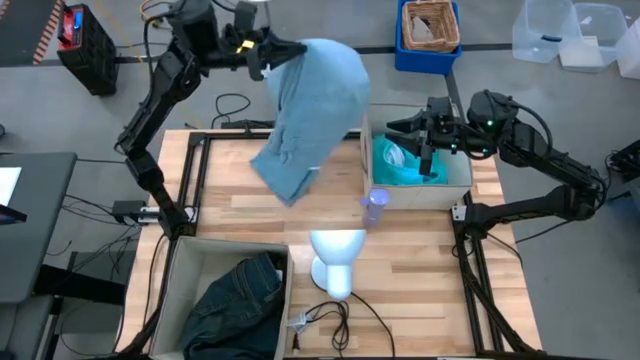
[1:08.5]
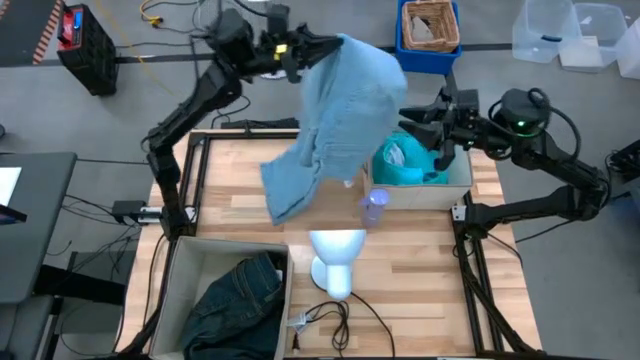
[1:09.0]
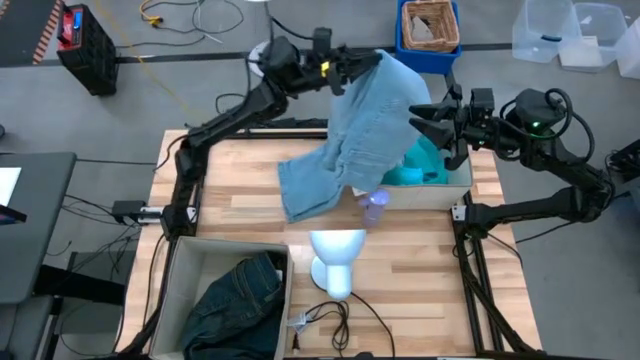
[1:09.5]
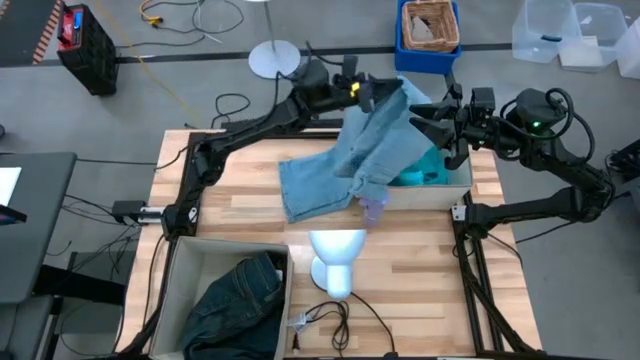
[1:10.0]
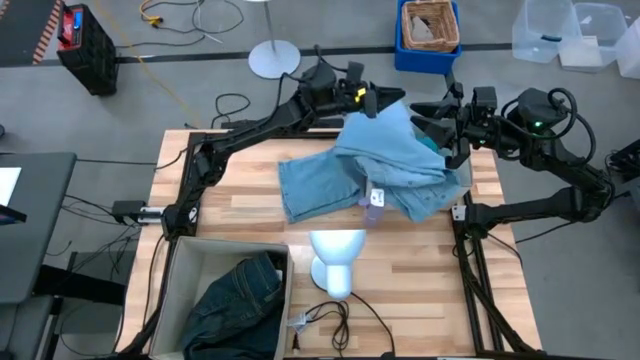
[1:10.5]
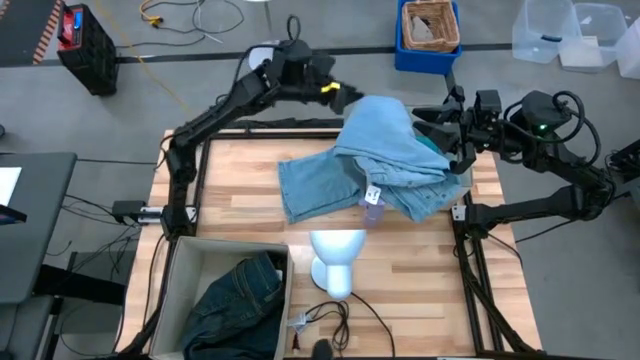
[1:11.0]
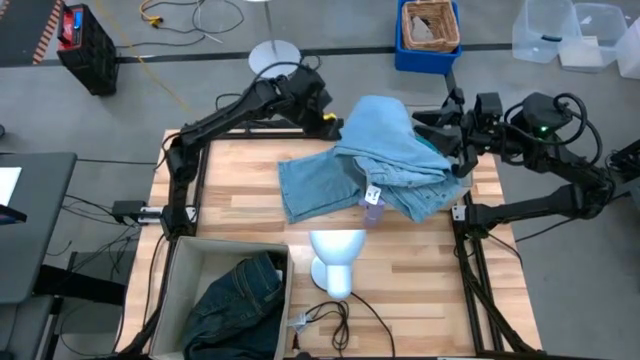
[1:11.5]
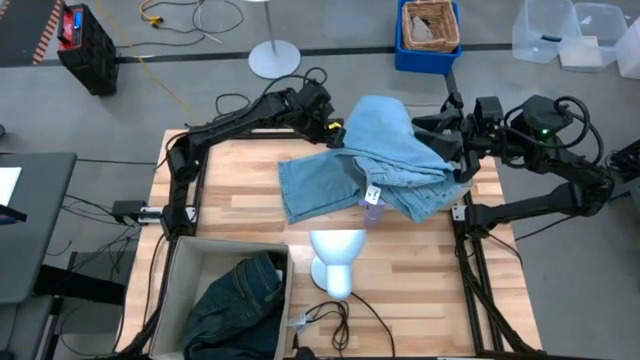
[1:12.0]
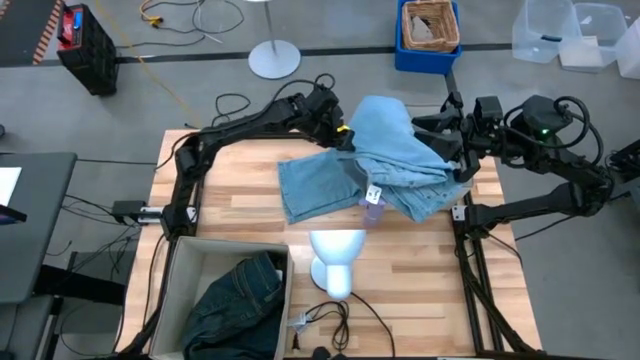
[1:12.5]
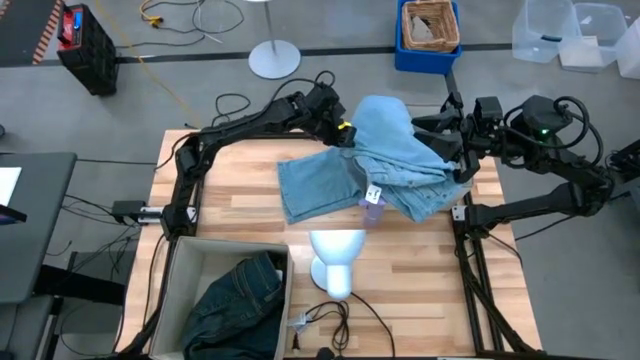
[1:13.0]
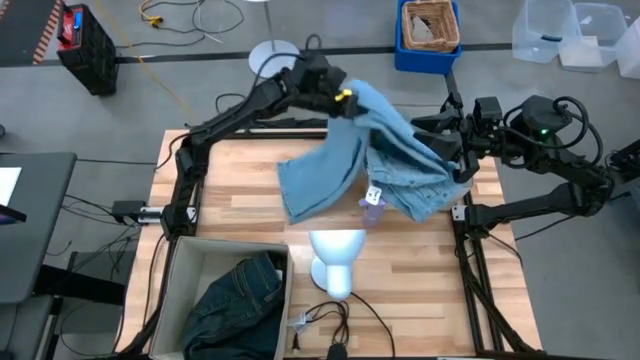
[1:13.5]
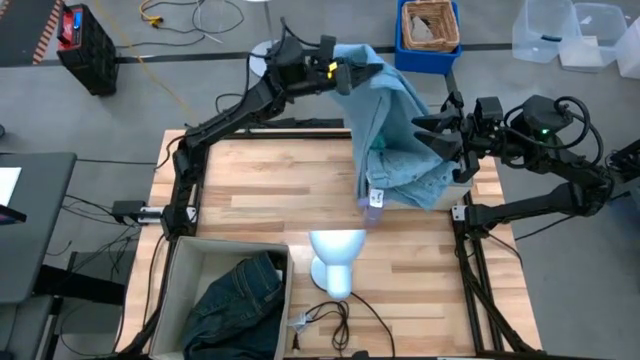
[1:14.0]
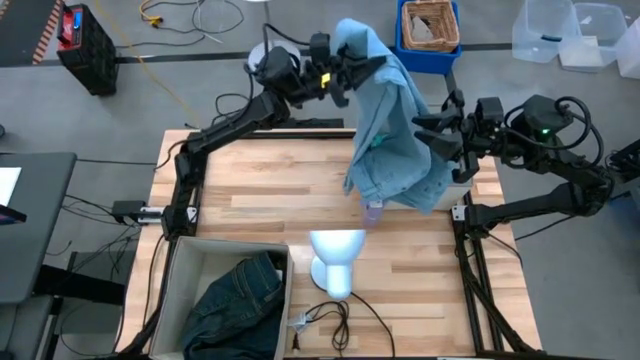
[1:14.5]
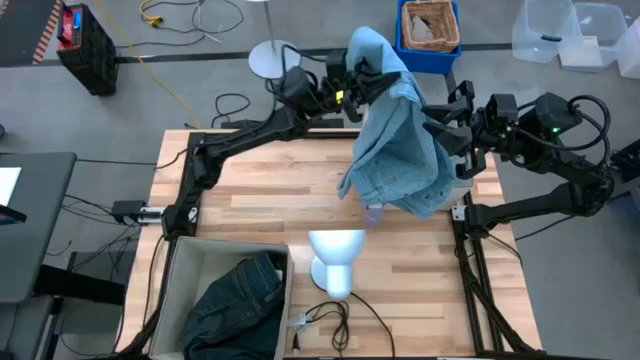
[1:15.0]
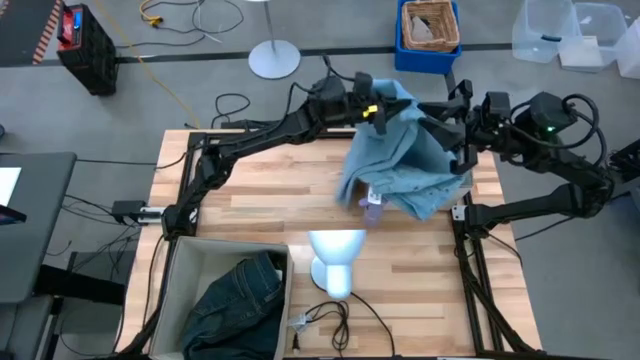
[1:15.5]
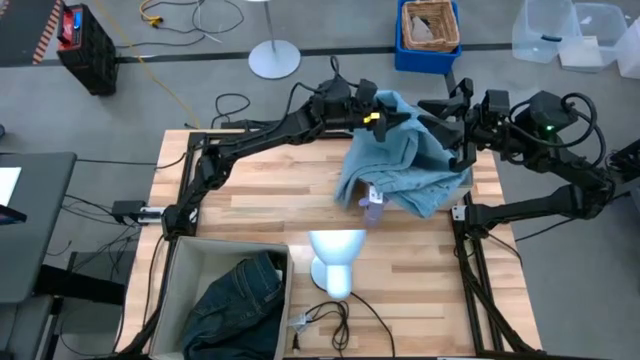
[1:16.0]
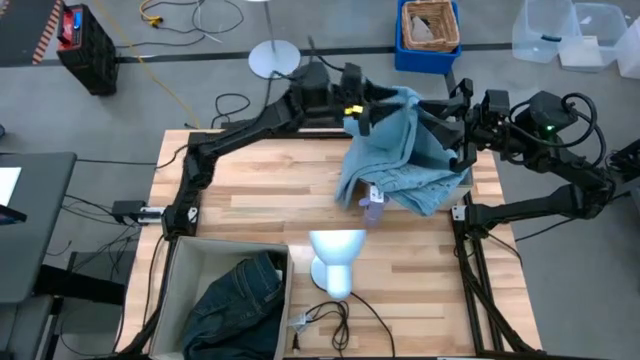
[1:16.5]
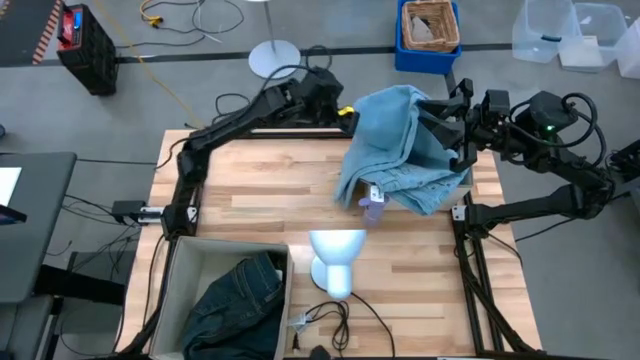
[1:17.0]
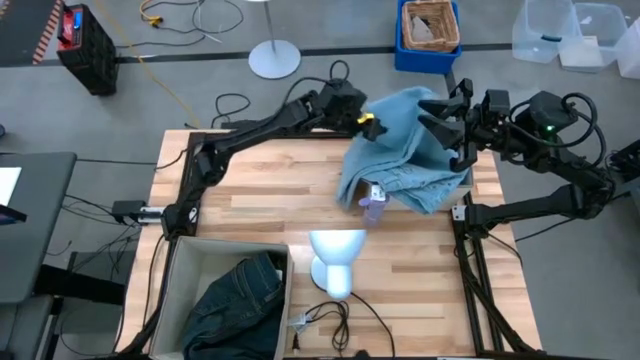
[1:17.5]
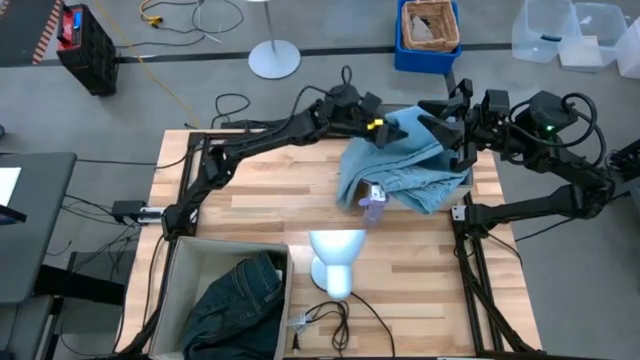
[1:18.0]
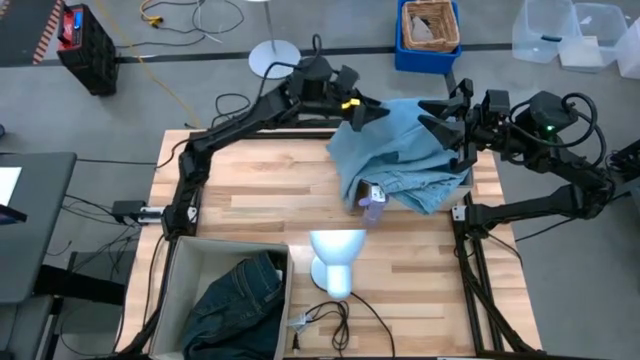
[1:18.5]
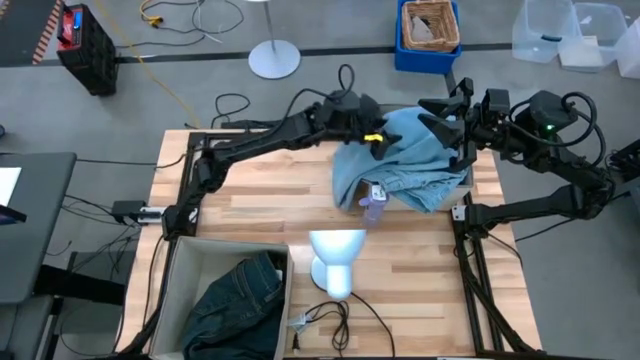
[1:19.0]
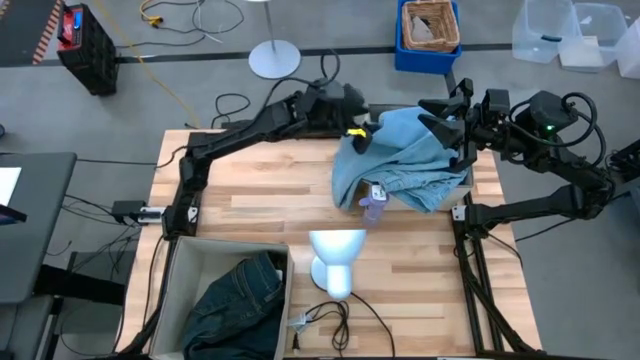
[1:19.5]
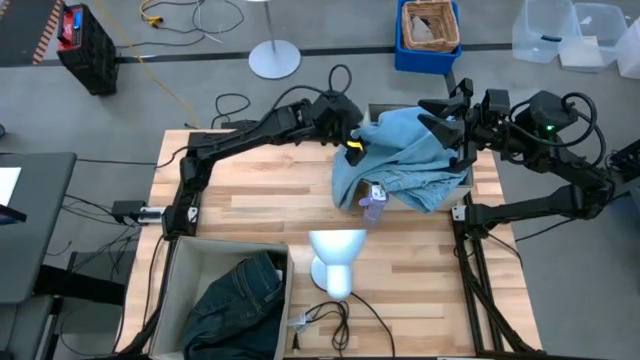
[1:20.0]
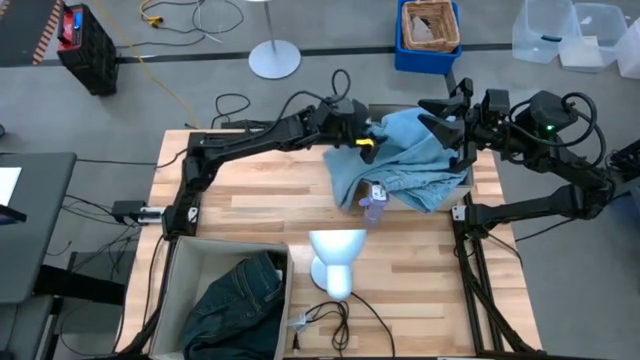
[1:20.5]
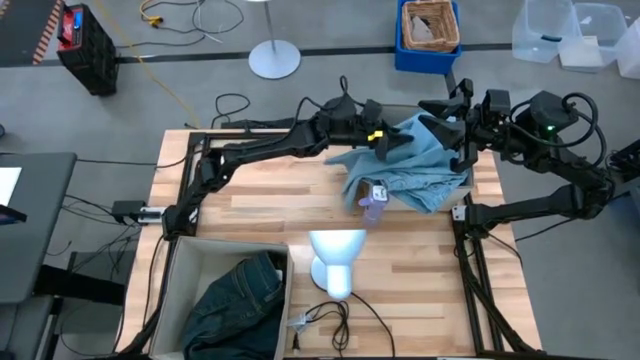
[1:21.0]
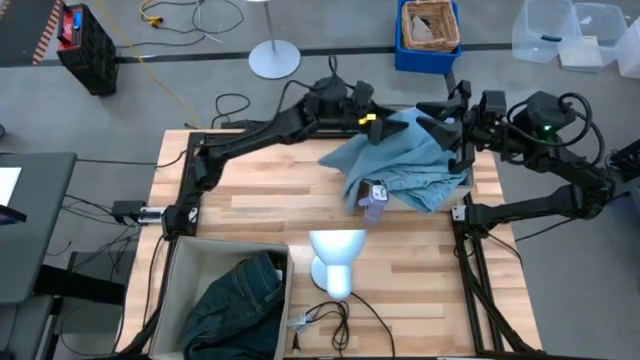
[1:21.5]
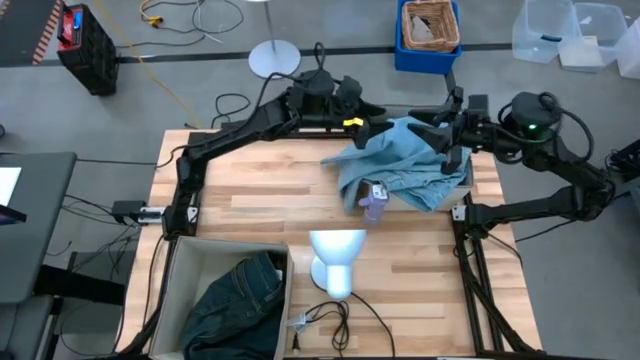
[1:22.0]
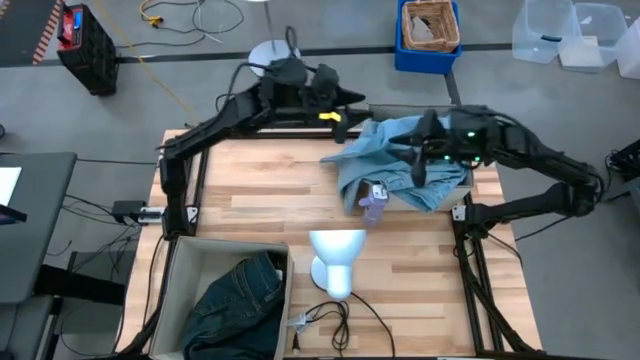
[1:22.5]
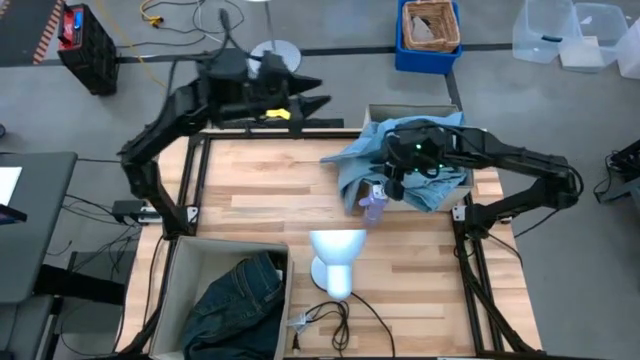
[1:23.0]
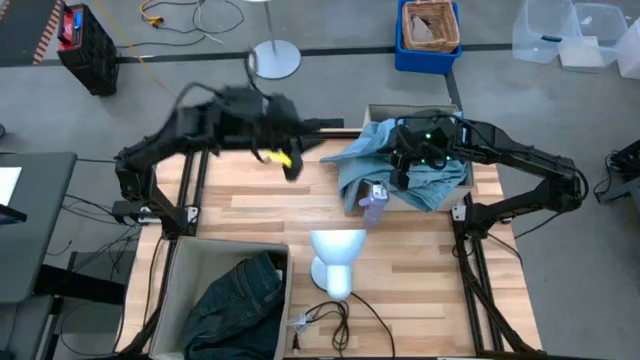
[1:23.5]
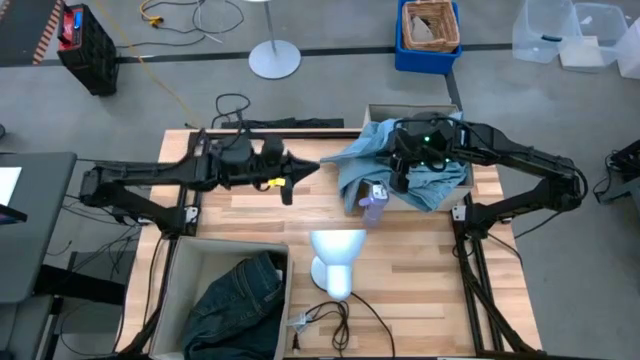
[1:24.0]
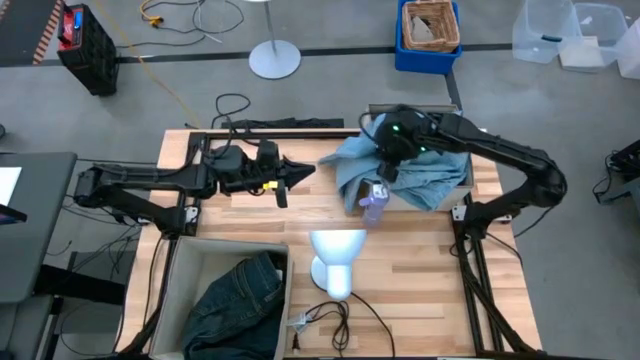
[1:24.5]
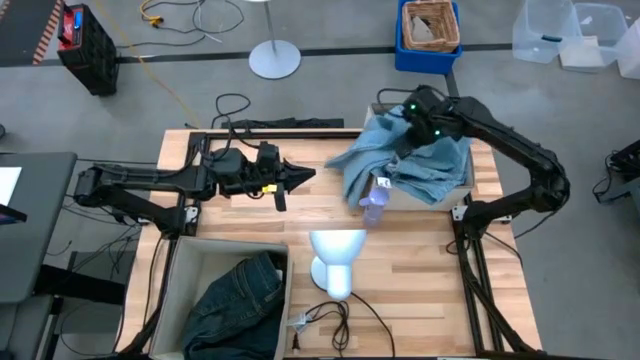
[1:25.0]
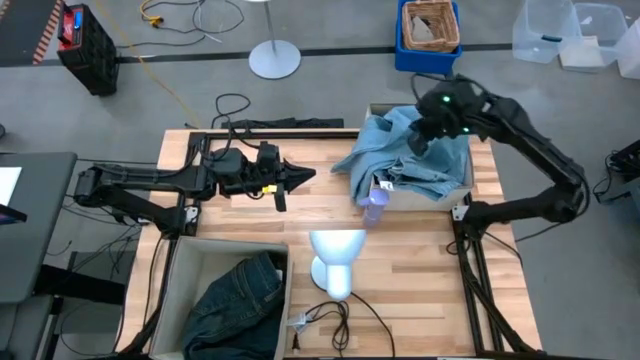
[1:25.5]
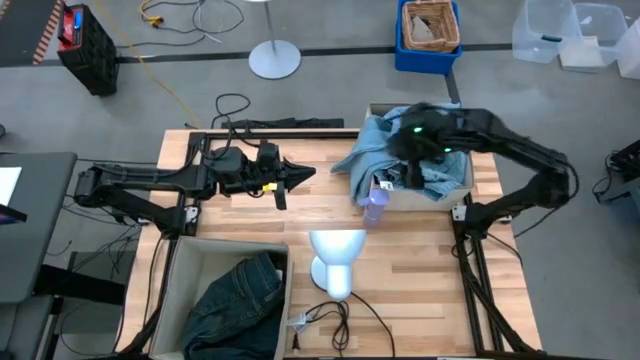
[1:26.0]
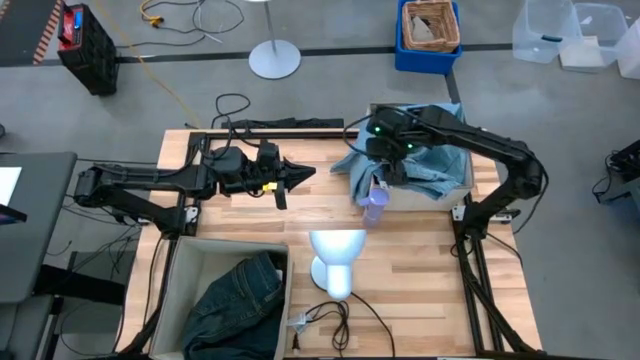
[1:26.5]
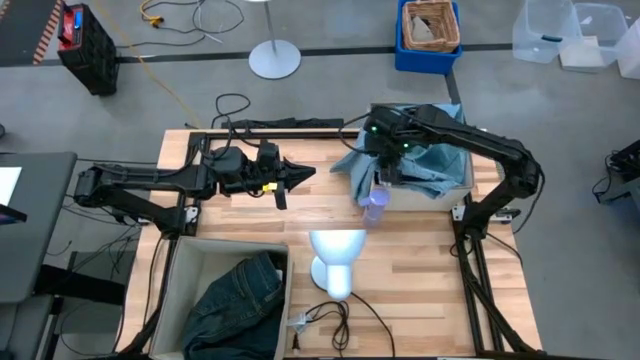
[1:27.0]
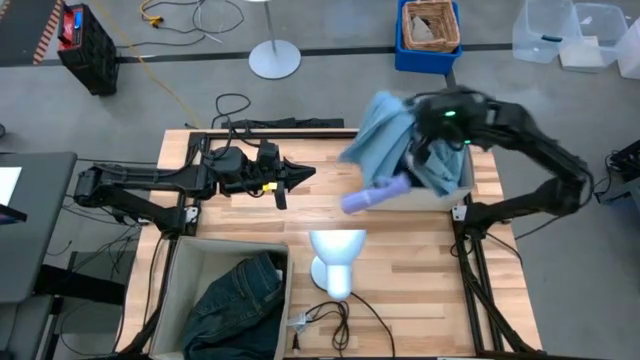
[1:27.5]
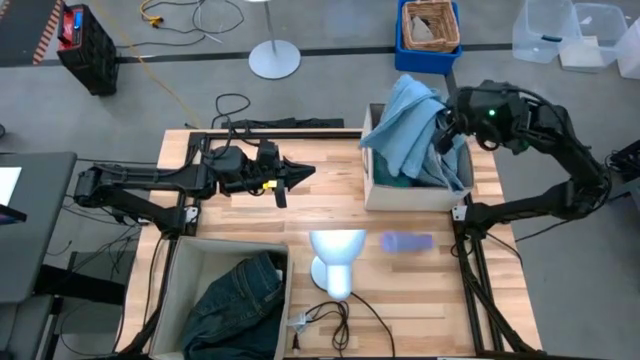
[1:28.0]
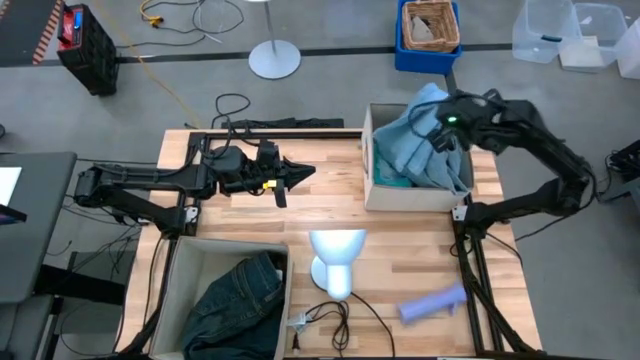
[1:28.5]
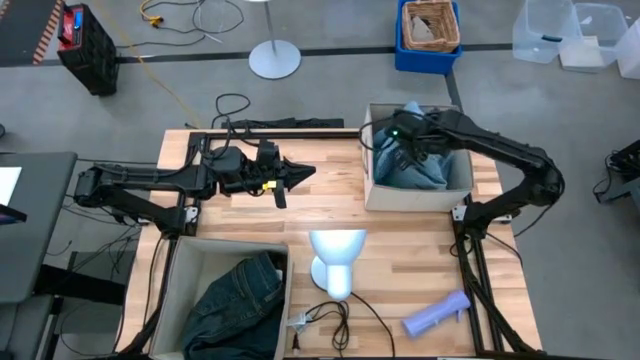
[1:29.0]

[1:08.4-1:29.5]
Task: Sort clothes
Put the light blue jeans into the top laundry organizer

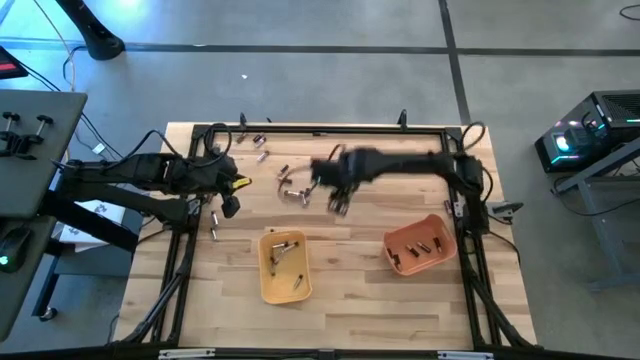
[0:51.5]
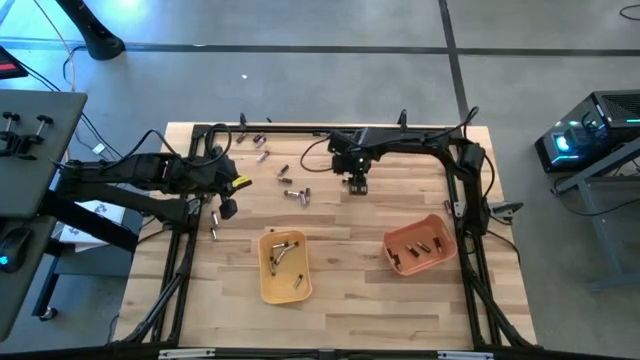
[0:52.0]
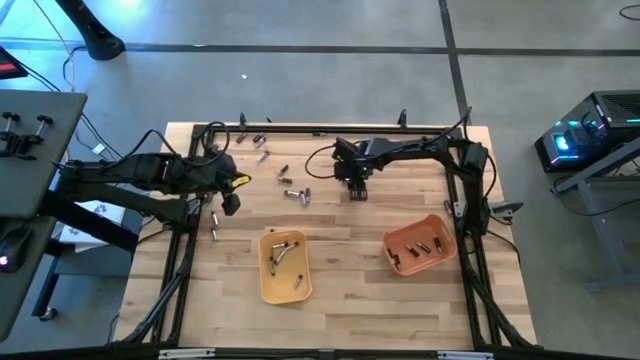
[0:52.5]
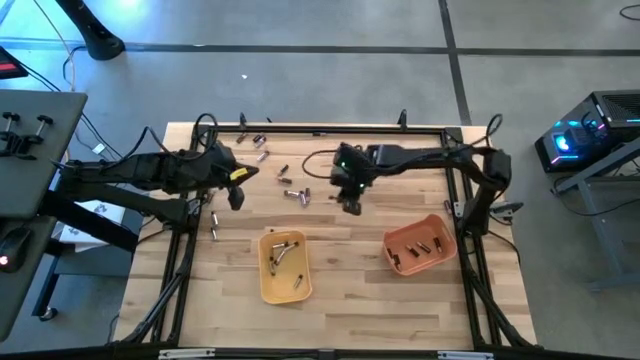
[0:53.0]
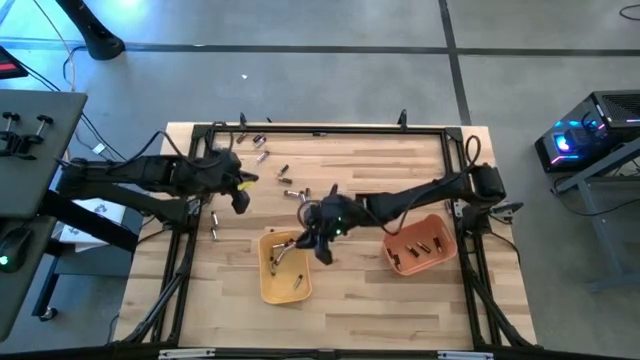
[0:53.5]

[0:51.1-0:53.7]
Task: Sort batteries
Put the silver battery into the yellow bin
